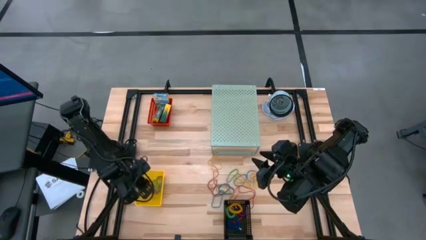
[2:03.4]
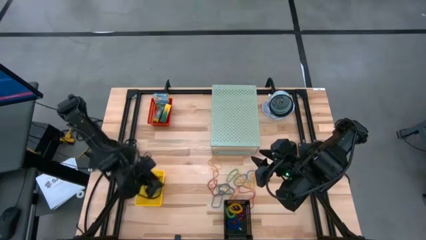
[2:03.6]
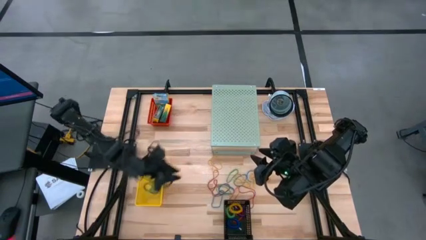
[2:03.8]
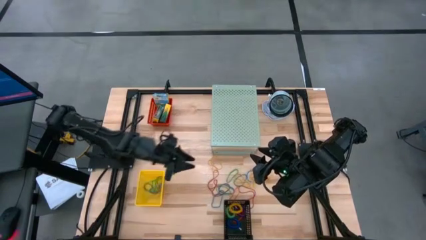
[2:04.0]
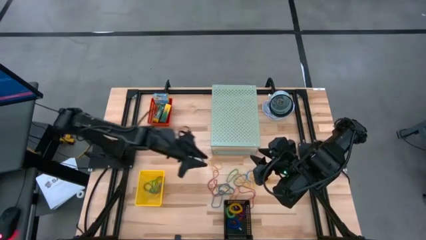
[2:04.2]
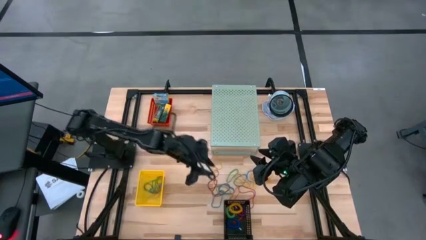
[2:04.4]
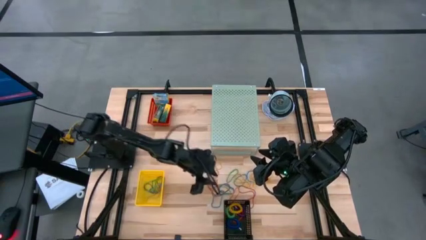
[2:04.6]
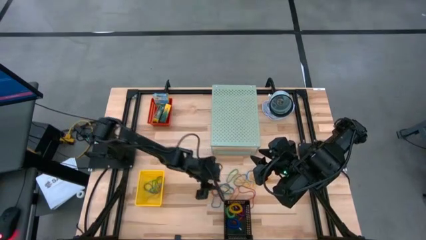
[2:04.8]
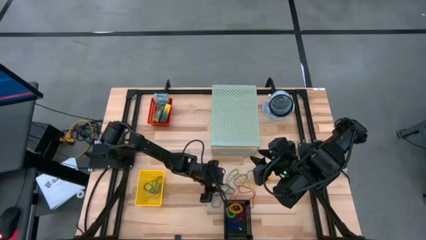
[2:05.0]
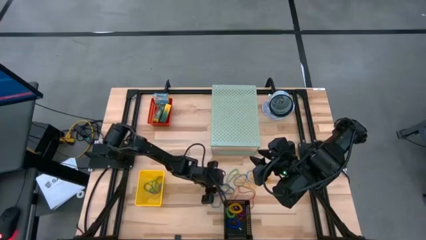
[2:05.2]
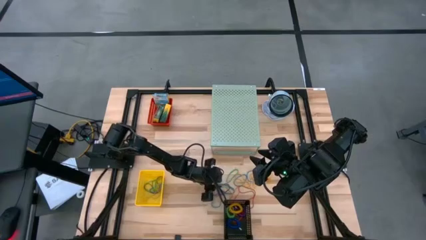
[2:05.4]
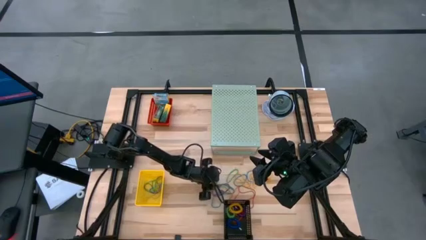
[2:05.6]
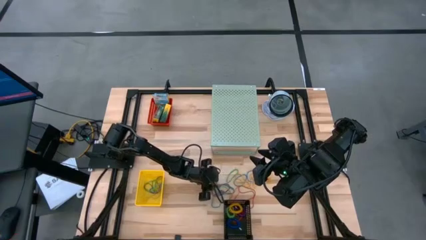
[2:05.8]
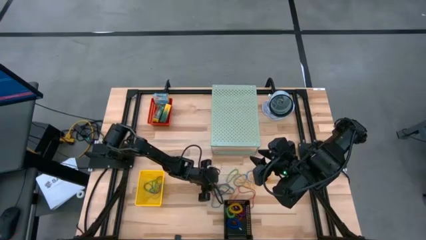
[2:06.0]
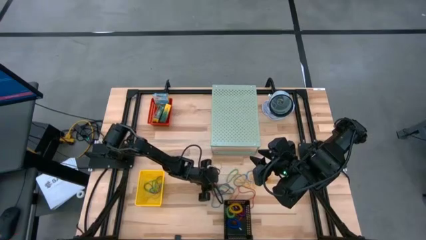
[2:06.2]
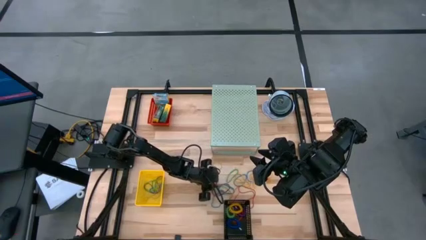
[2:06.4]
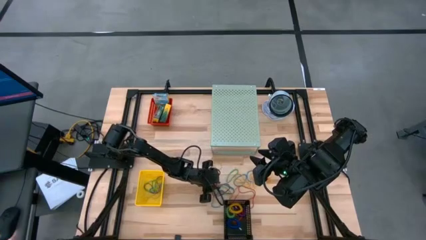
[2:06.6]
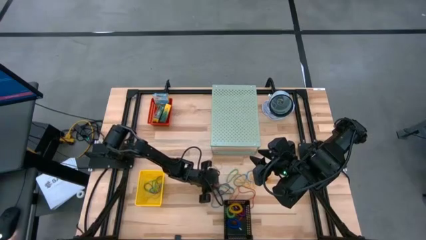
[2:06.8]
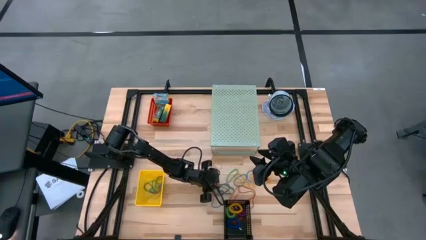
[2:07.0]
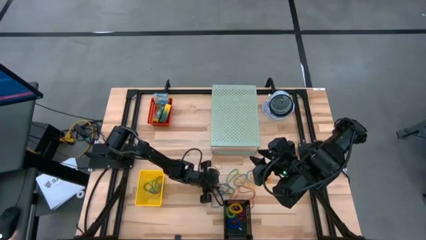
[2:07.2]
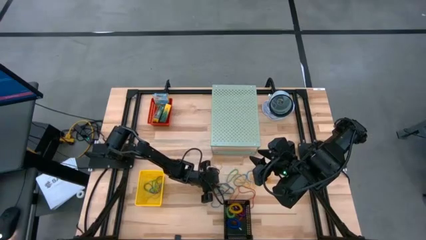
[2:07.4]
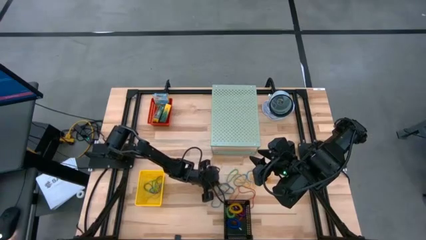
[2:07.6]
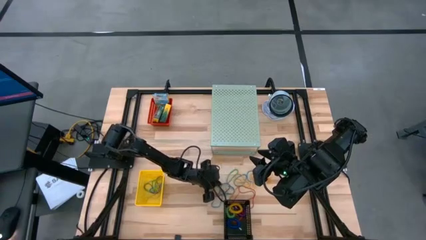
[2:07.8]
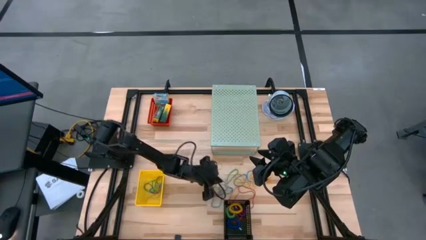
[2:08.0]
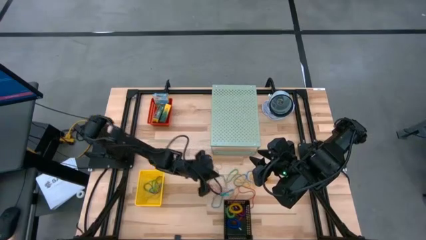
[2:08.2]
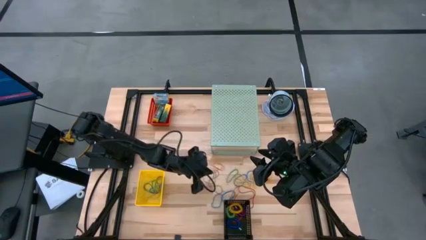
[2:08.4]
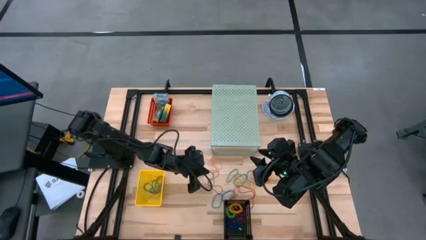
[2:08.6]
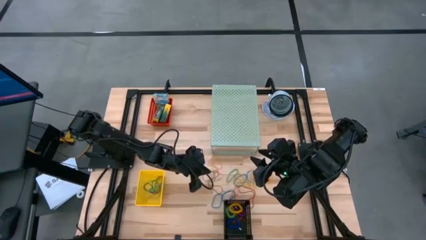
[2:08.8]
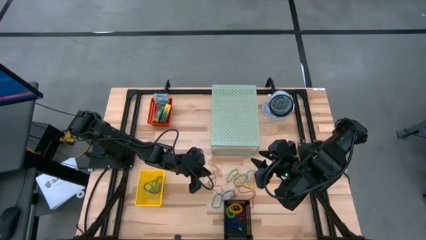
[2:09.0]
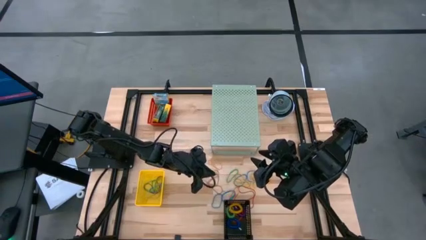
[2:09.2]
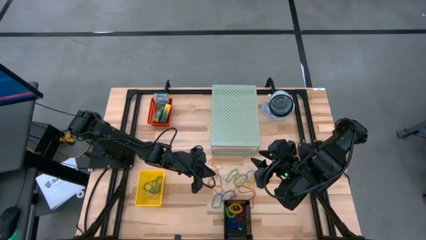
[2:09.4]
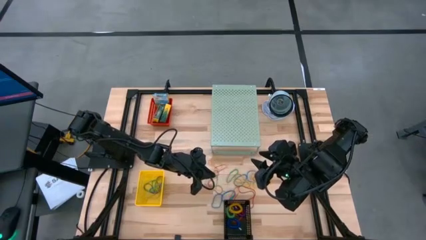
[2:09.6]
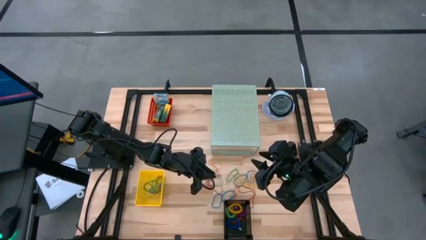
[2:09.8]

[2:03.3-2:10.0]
Task: Pick & Place Office Desk Supplies
Put the green rubber band into the yellow bin

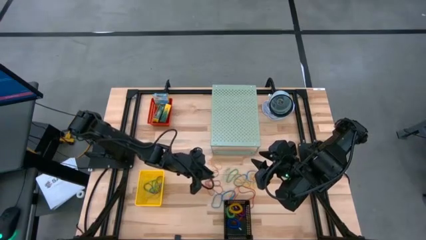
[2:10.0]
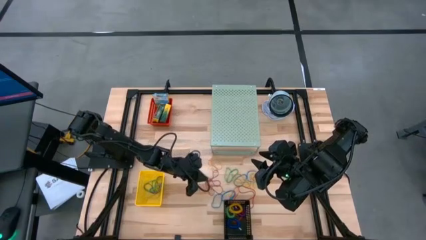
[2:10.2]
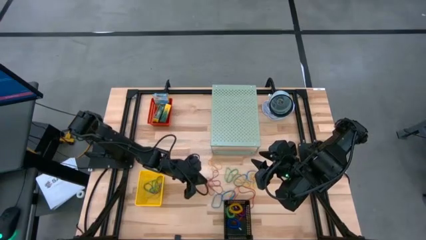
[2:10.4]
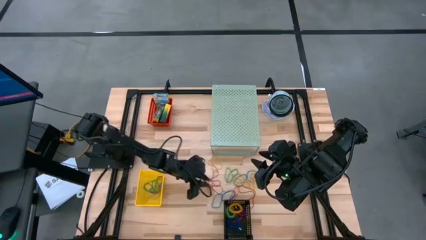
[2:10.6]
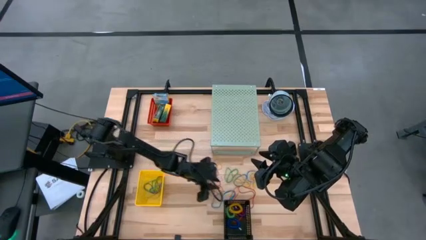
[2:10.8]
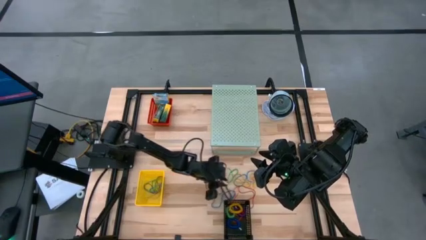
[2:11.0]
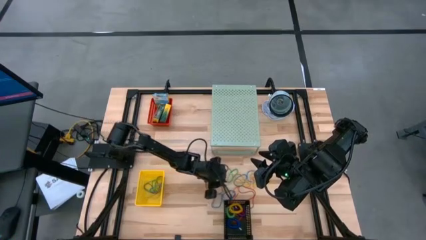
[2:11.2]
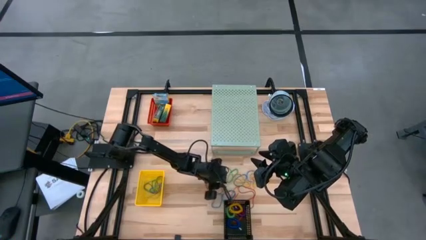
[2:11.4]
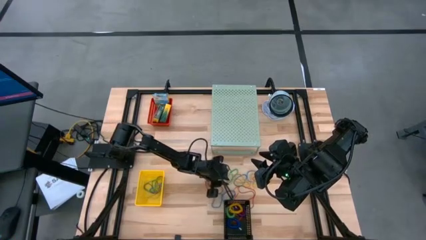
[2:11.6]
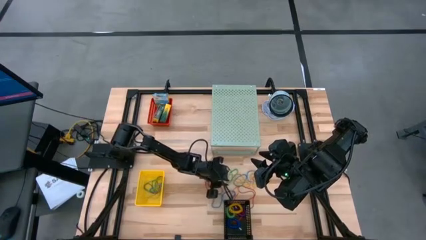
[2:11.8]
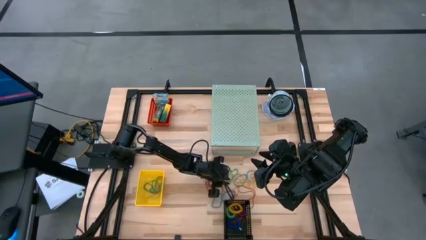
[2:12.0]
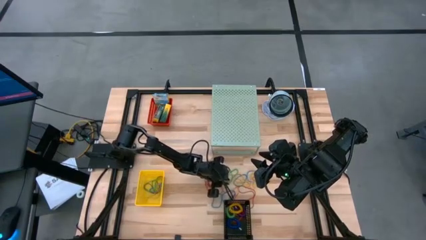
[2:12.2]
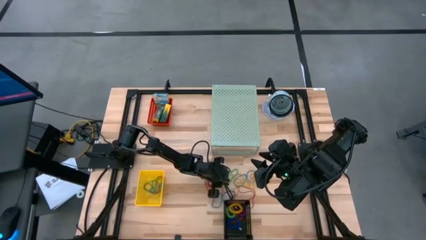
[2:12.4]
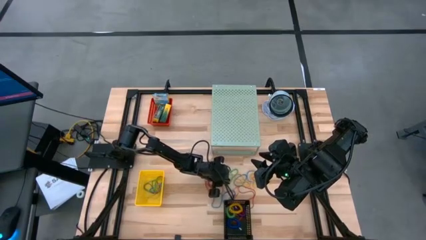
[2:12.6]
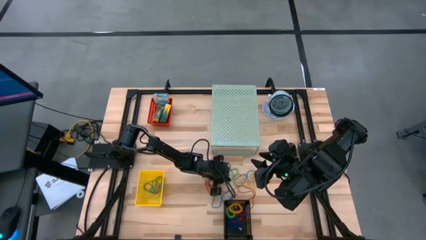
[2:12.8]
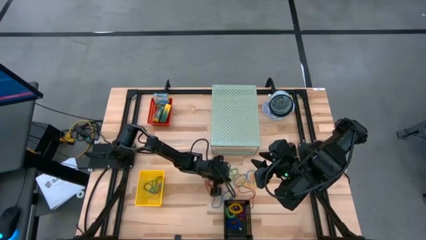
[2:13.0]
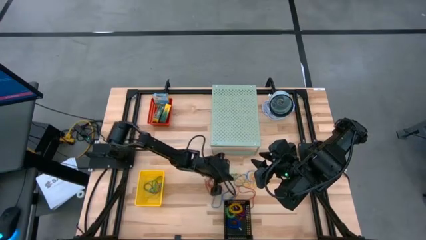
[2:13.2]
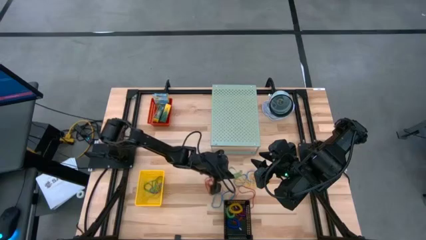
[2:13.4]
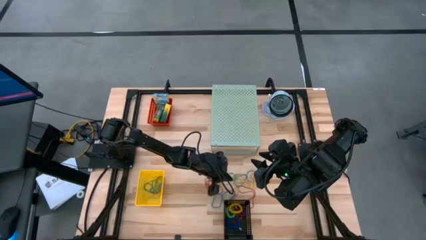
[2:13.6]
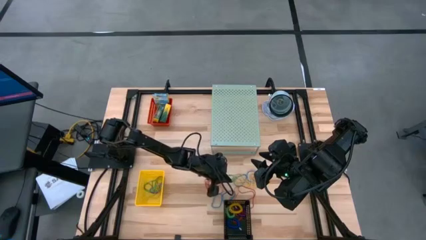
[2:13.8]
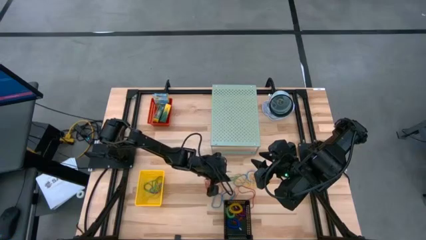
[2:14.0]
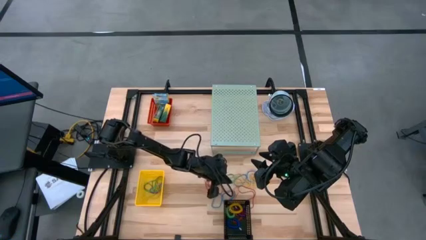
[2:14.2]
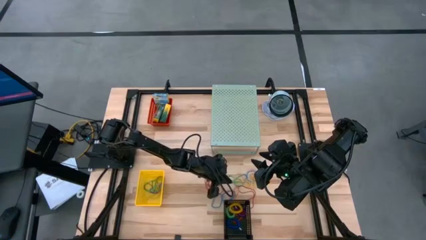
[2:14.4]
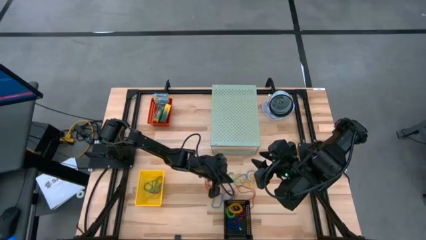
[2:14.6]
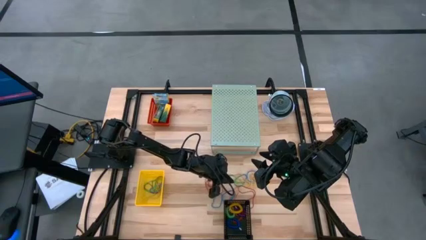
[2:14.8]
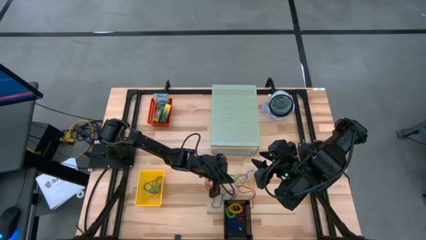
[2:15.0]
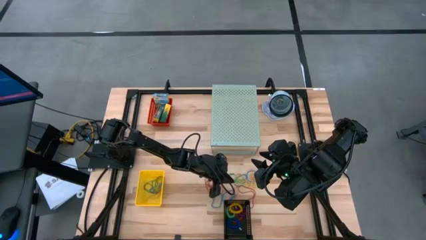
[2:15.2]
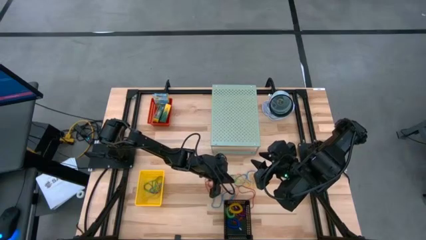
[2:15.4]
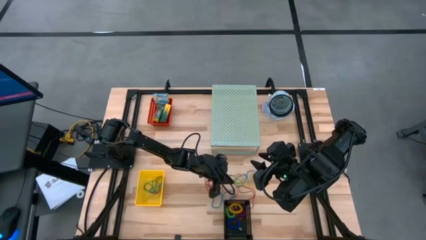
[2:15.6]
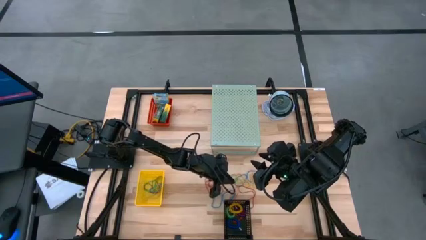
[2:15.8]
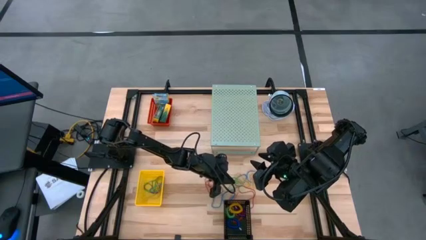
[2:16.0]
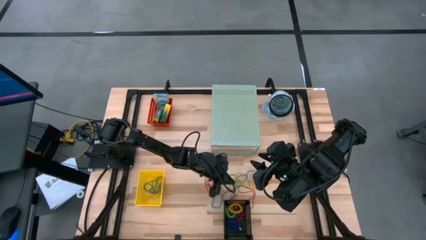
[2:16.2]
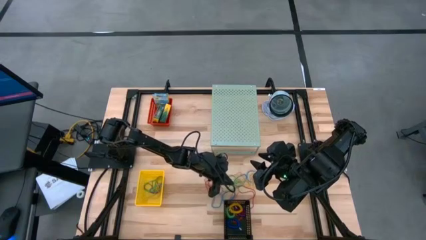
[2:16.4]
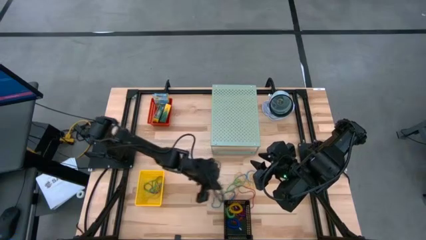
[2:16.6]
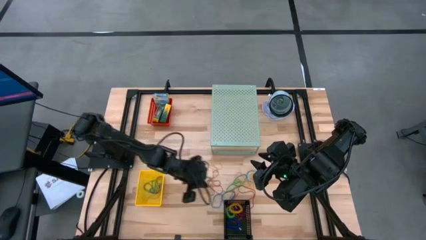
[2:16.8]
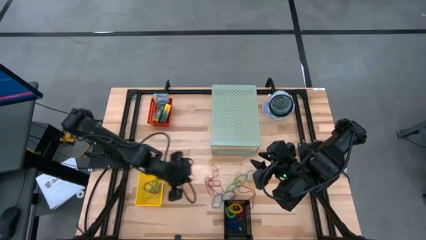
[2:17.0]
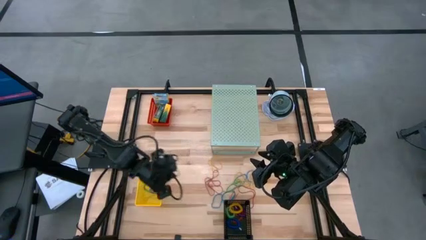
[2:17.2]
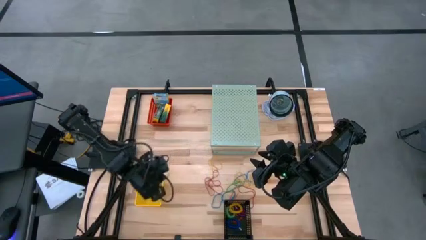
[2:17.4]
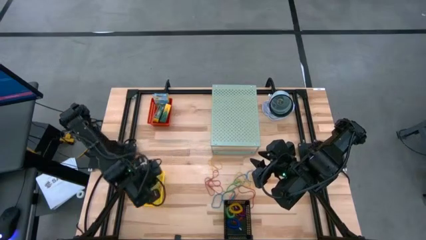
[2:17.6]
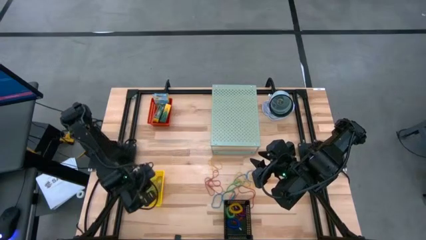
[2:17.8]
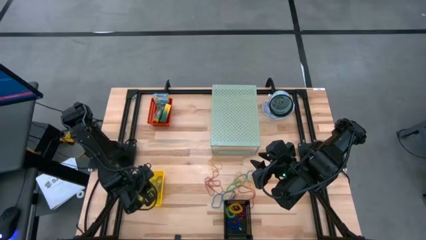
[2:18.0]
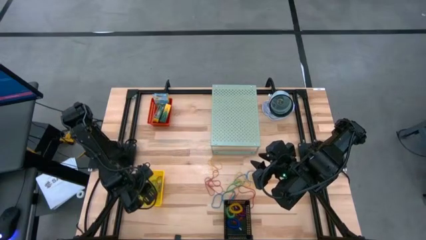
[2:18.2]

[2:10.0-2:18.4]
Put the green rubber band into the yellow bin

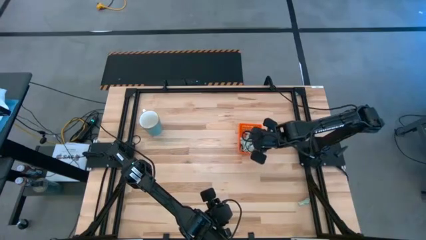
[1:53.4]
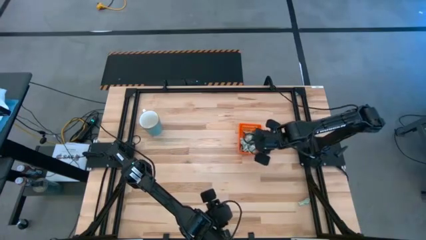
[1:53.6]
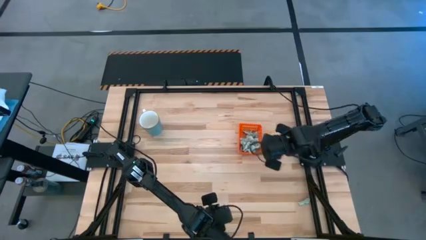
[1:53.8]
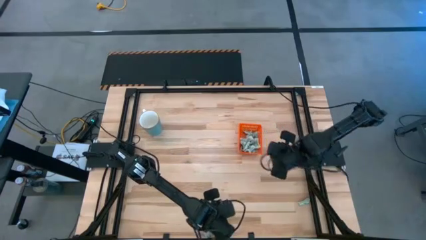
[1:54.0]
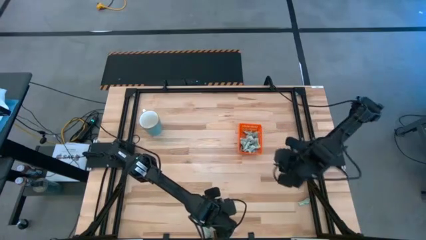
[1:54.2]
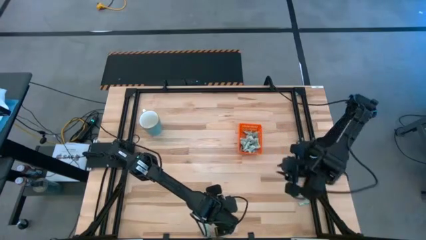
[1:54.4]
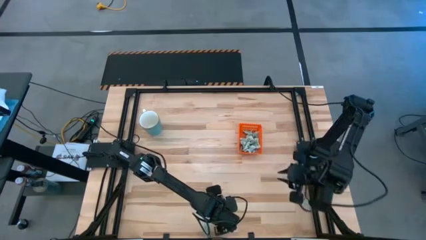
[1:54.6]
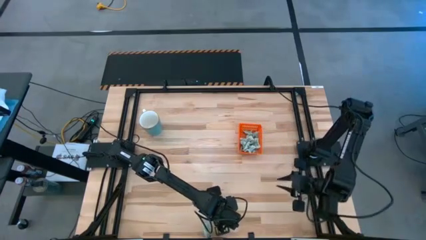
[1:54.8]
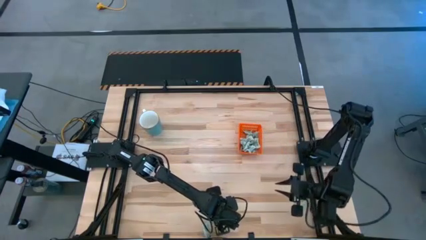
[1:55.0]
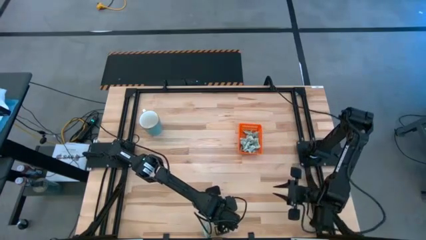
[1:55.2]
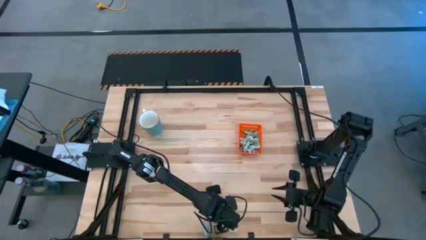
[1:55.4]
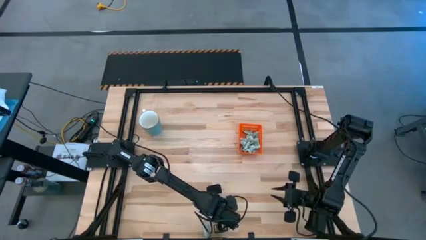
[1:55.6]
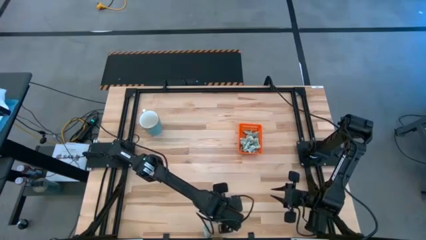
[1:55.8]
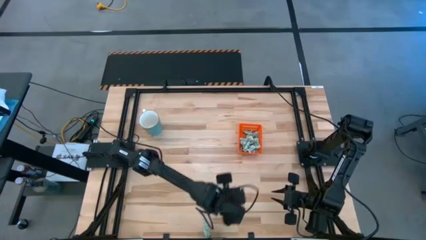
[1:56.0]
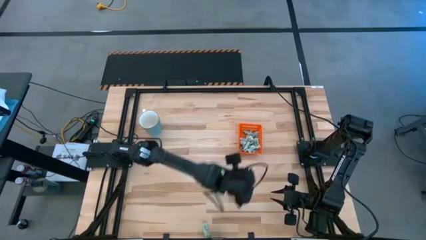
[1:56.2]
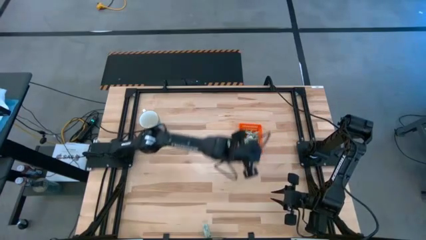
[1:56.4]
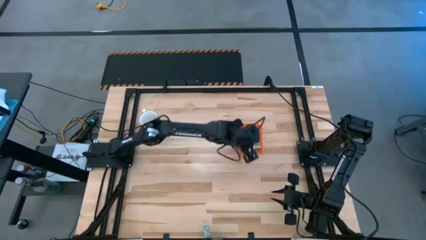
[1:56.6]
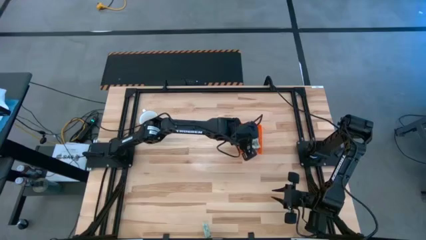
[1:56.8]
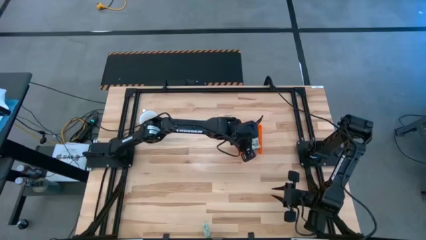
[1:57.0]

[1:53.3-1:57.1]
Task: Pick and place Stevia / Truvia into bins
Put the middle stevia packet into the orange bin
